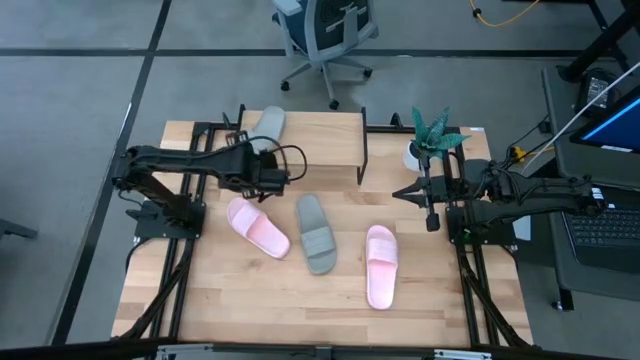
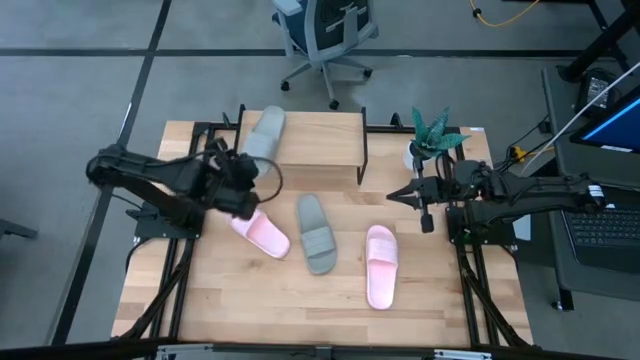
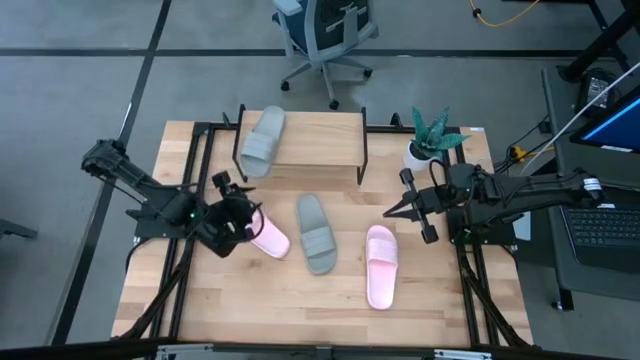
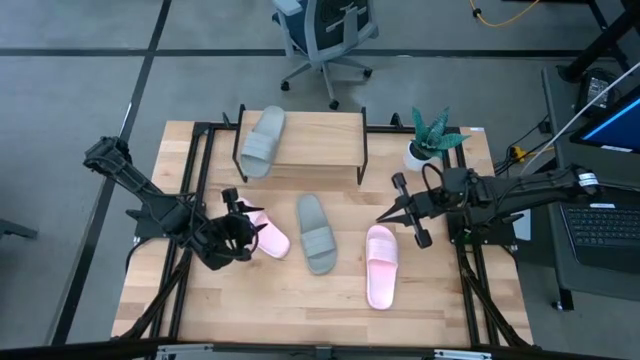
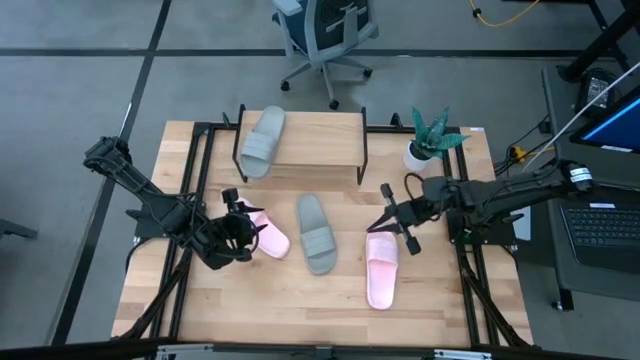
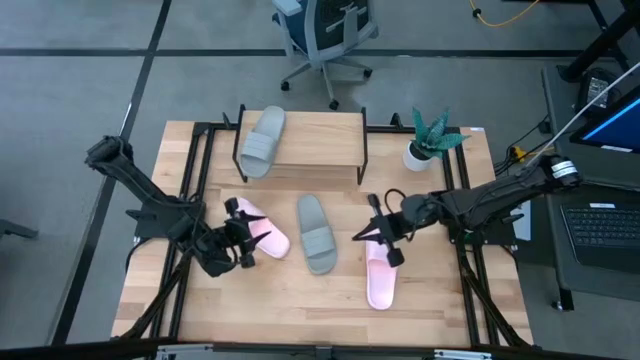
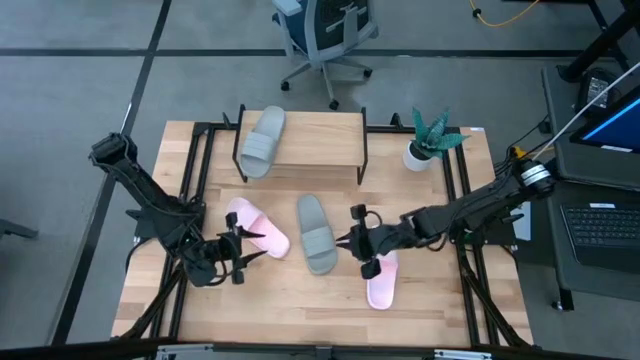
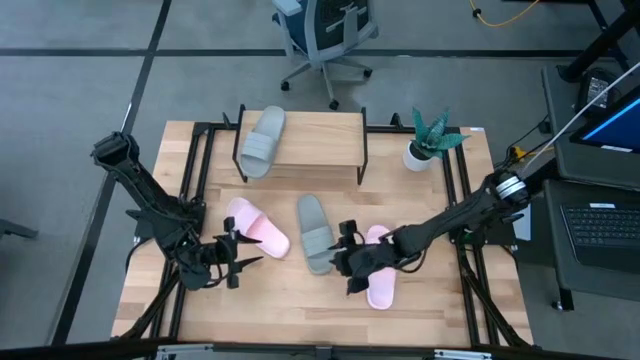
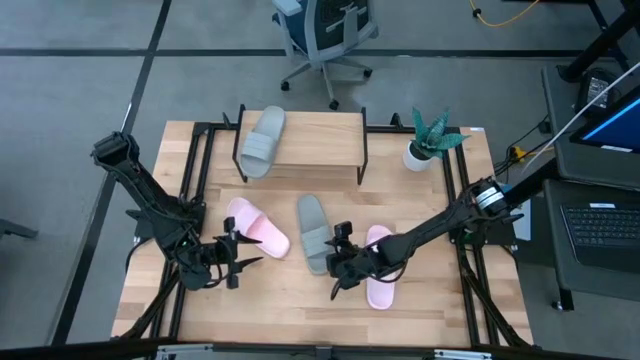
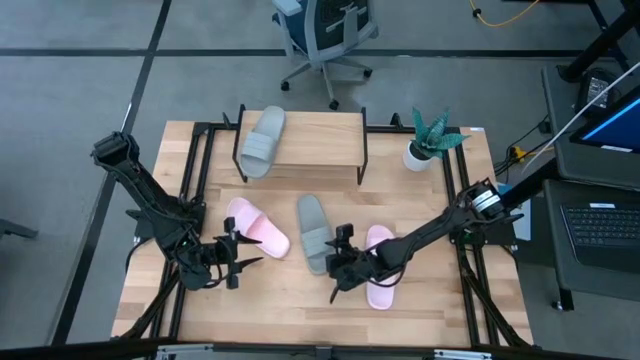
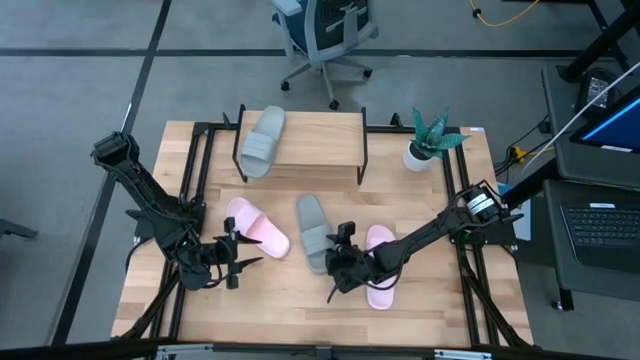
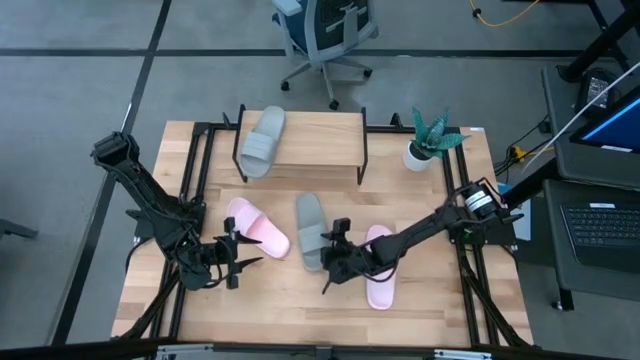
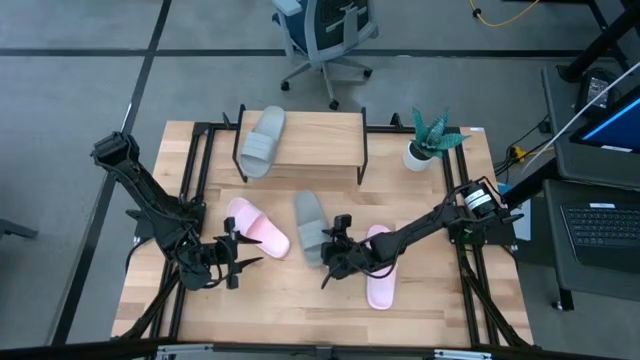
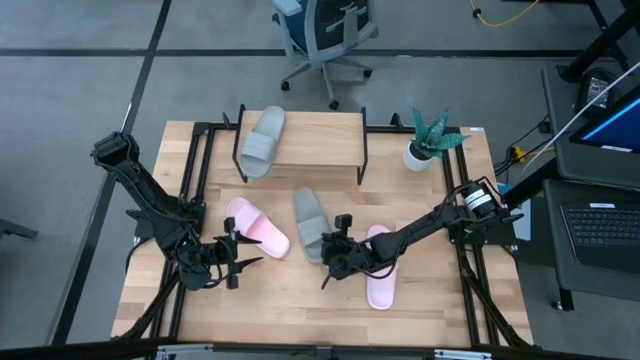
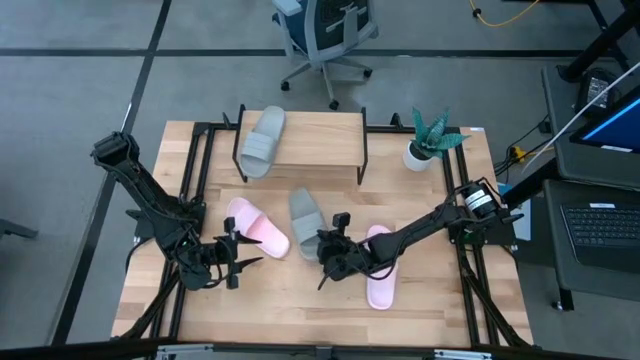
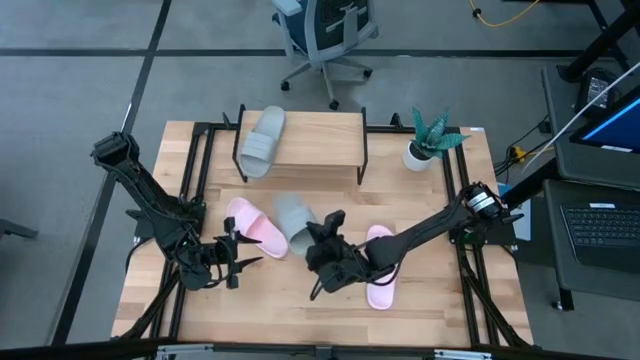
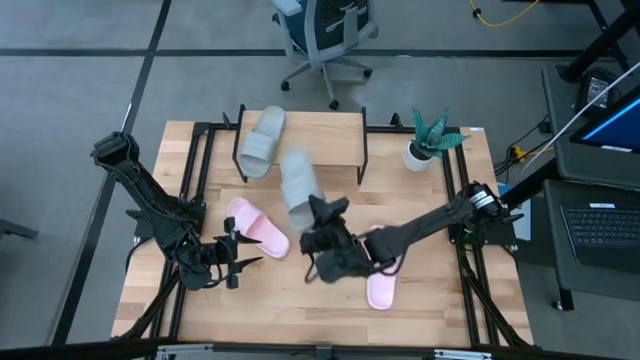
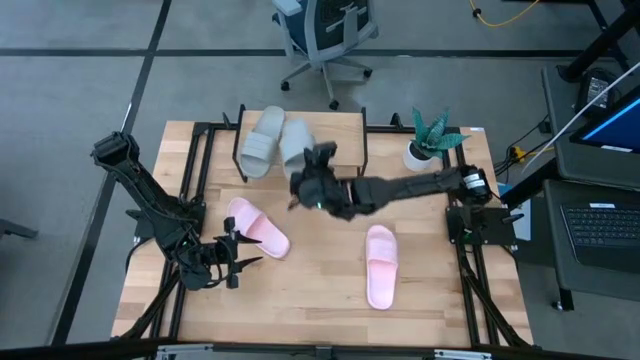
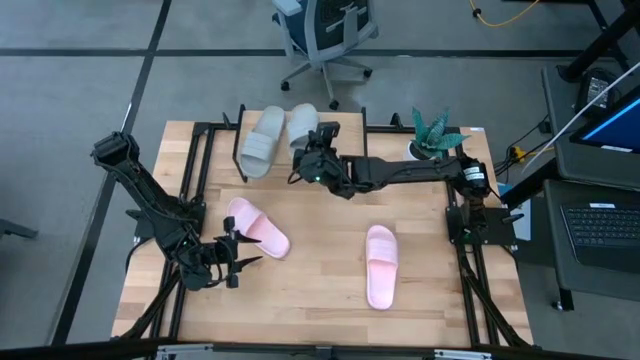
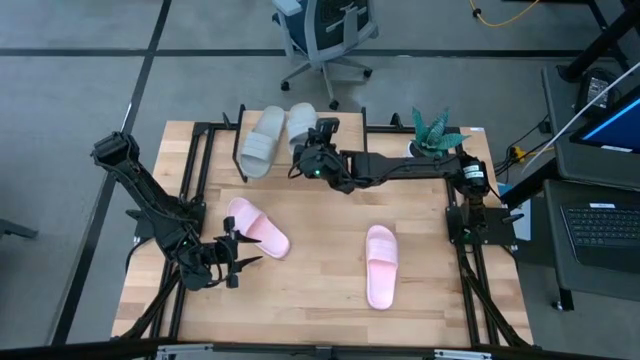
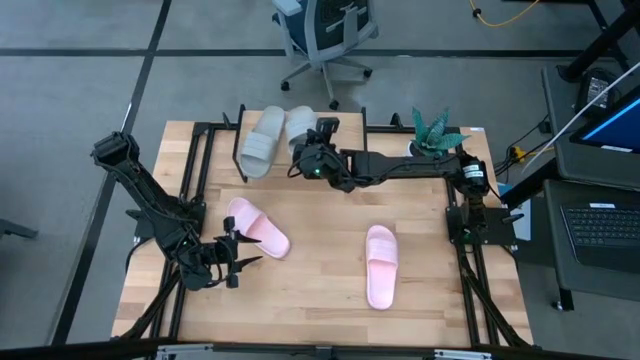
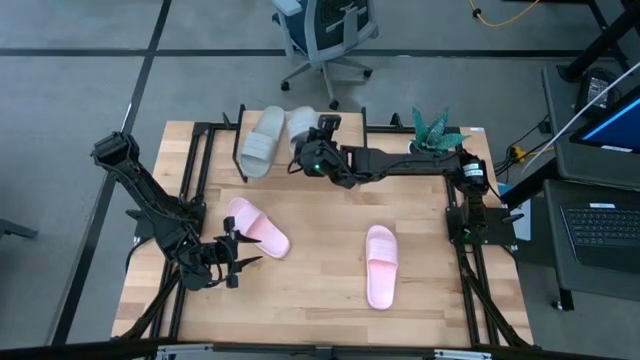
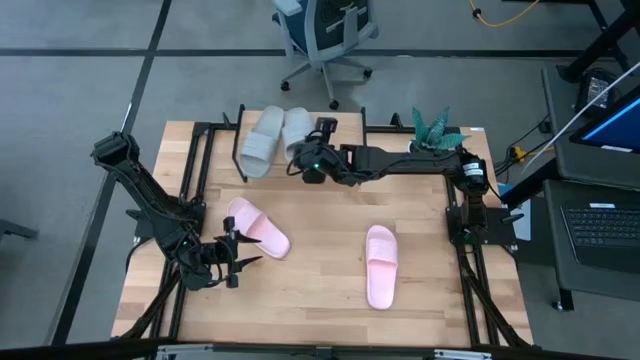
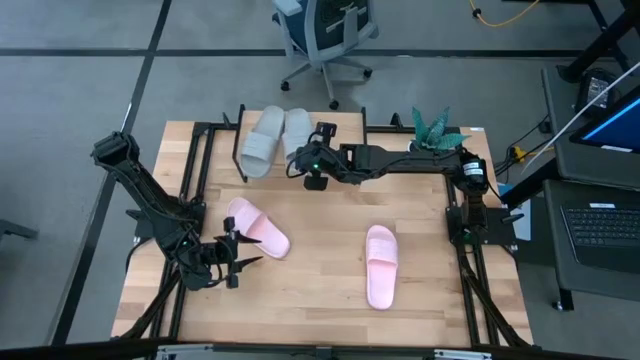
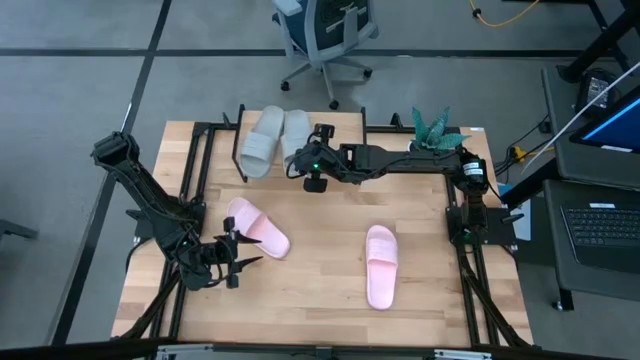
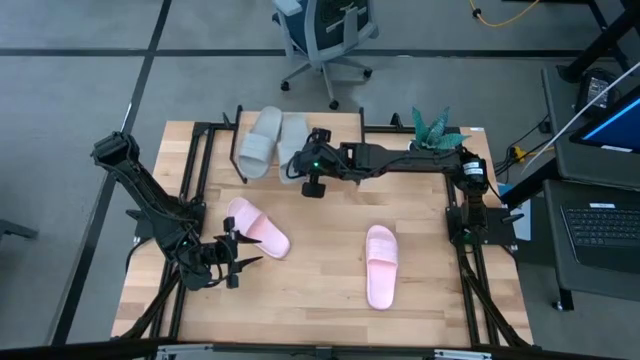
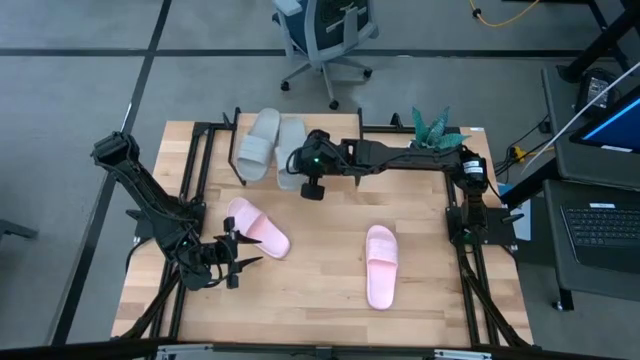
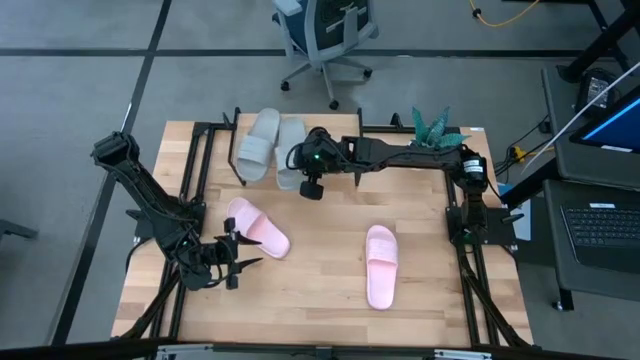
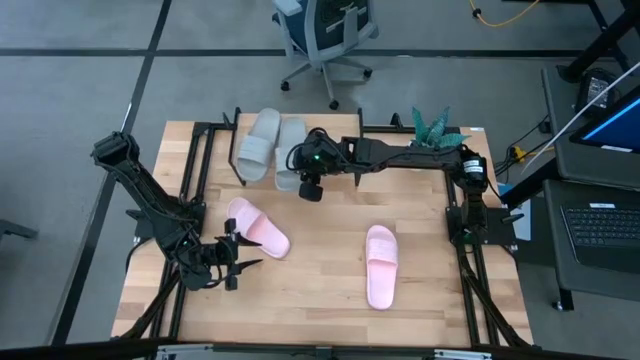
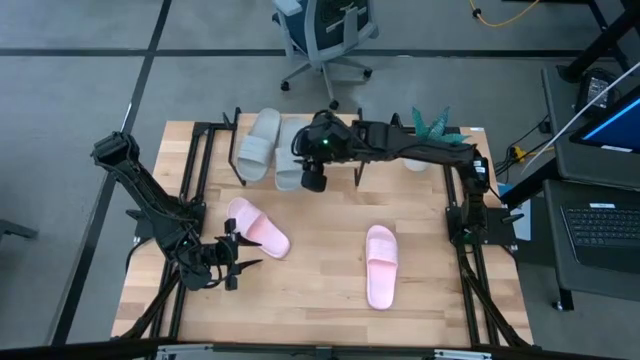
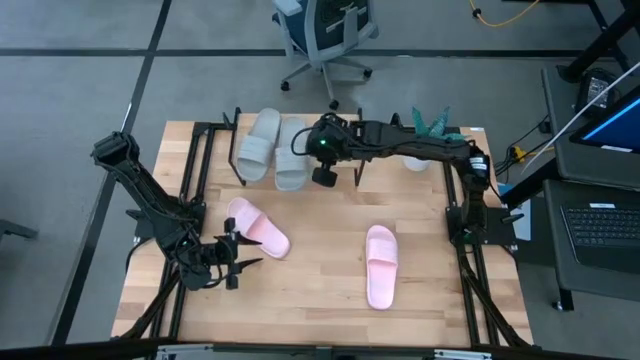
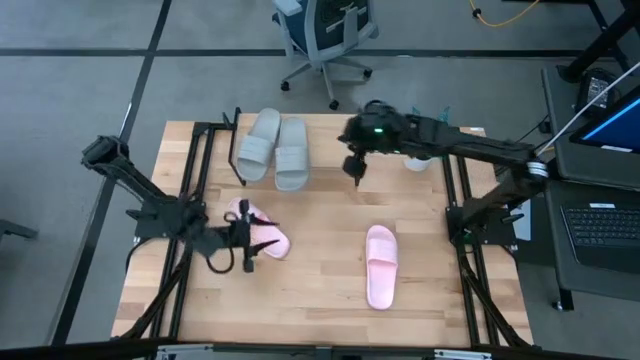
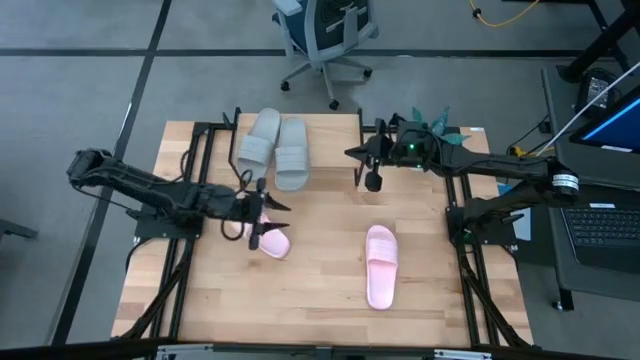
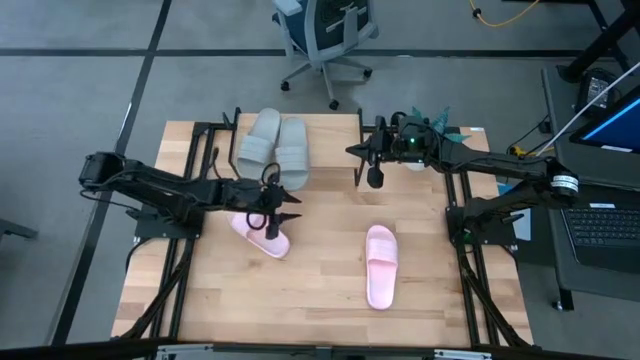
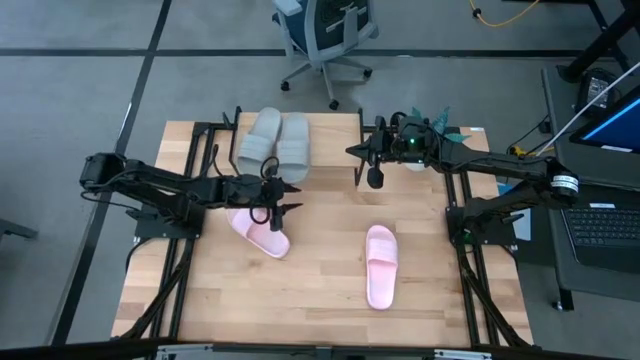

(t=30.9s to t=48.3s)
Task: Pick and place slides into the shelf
Put the gray slipper on the shelf
